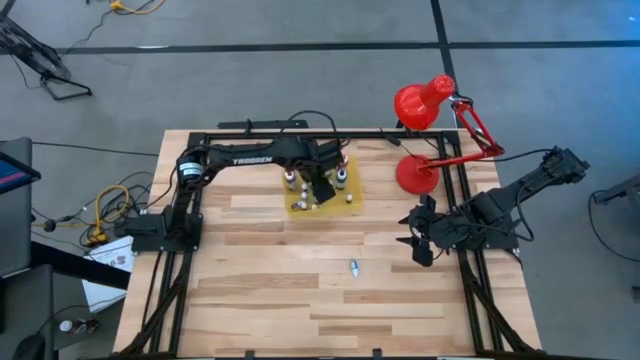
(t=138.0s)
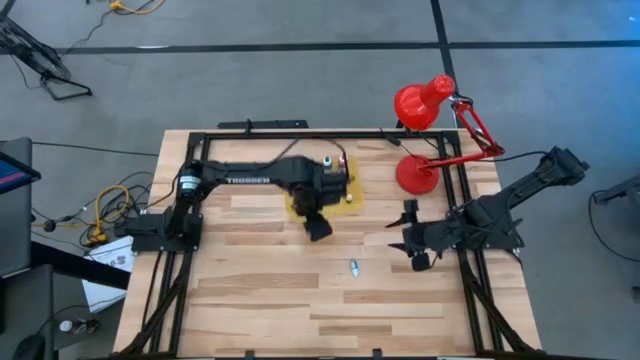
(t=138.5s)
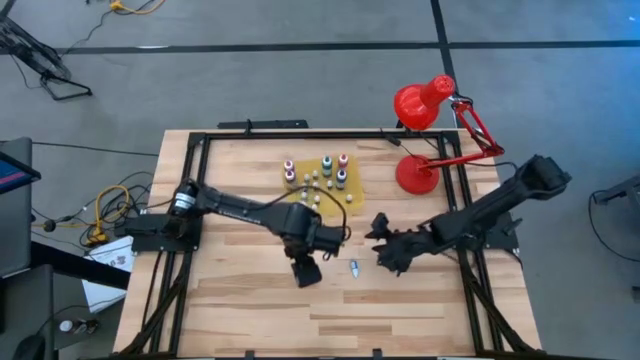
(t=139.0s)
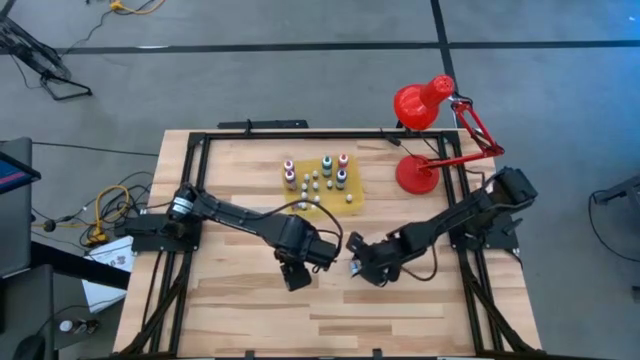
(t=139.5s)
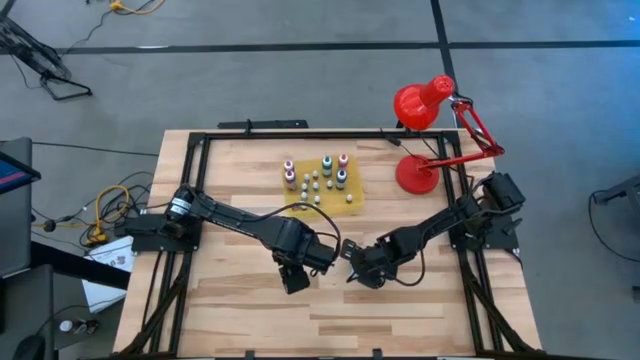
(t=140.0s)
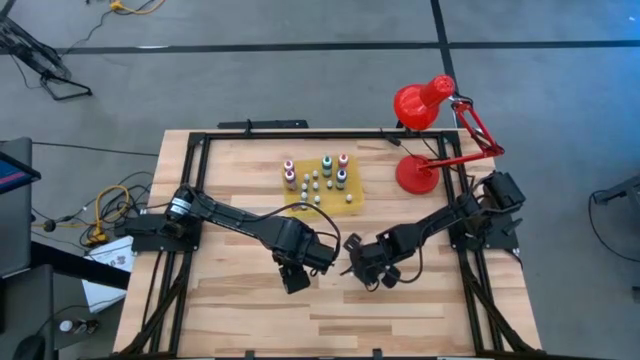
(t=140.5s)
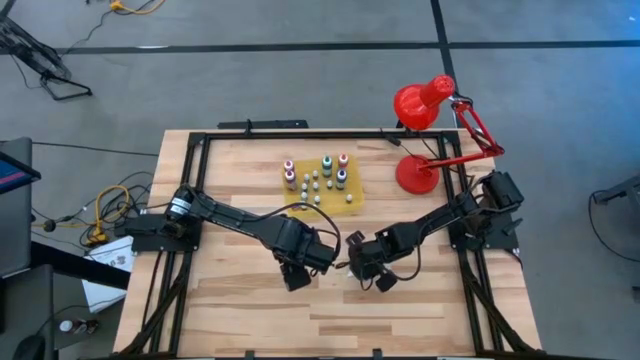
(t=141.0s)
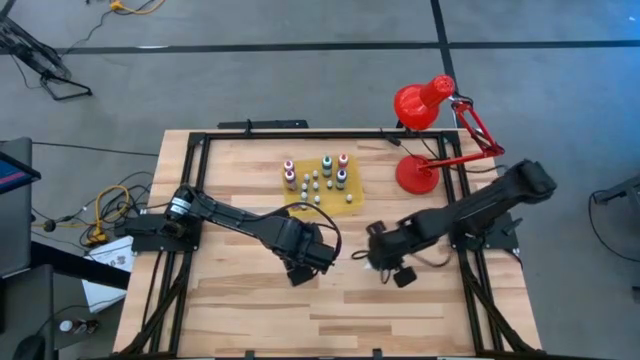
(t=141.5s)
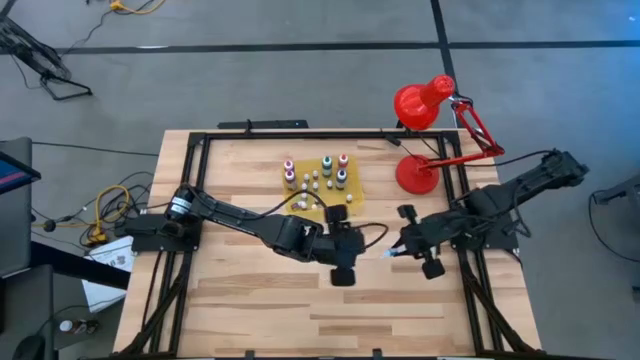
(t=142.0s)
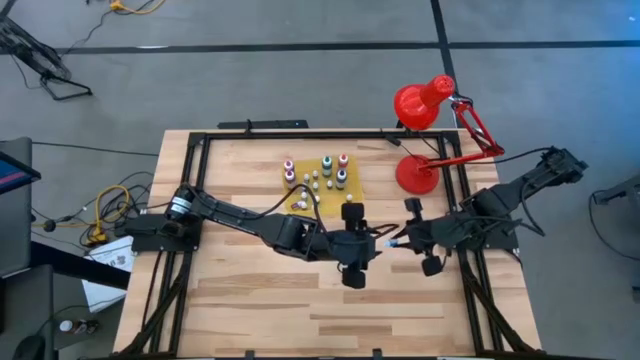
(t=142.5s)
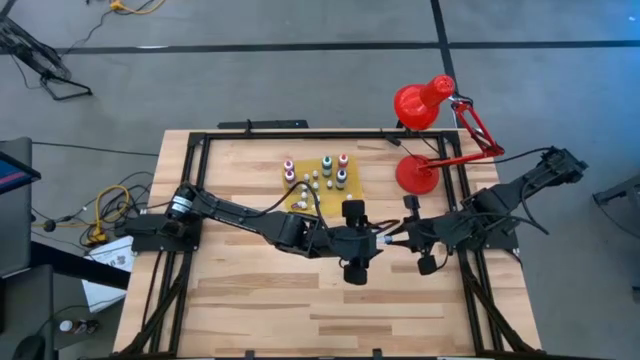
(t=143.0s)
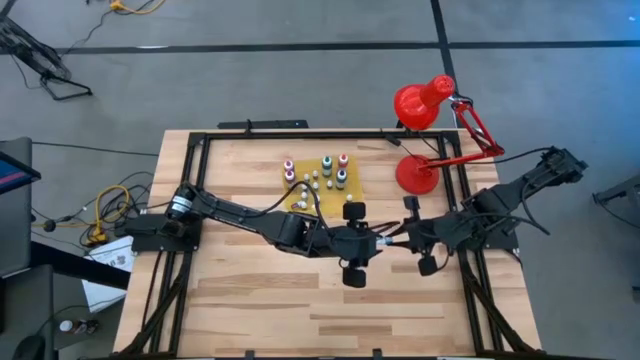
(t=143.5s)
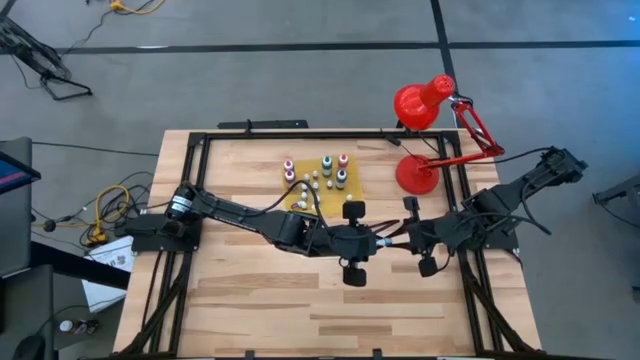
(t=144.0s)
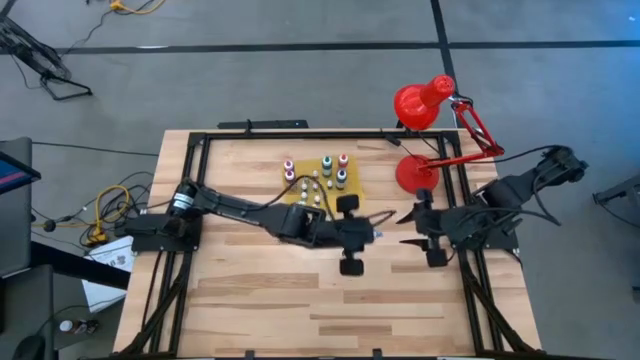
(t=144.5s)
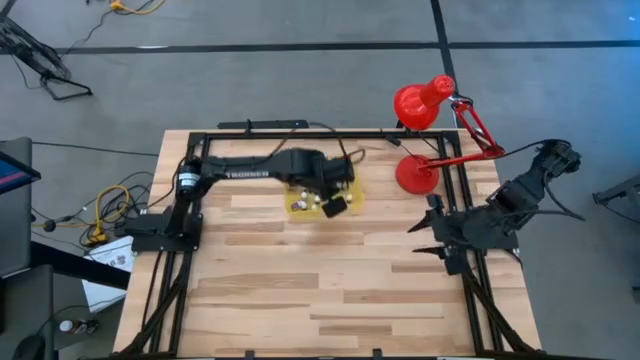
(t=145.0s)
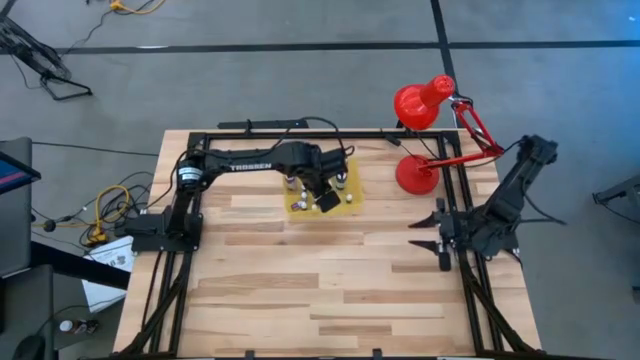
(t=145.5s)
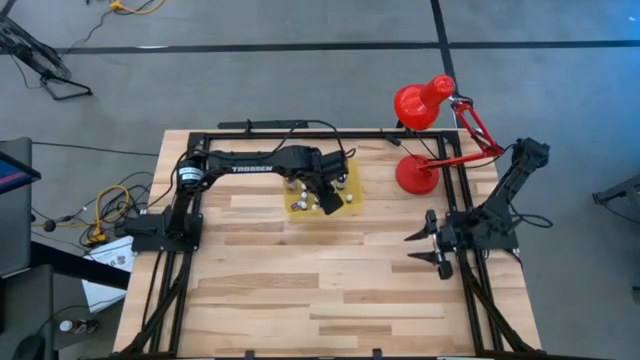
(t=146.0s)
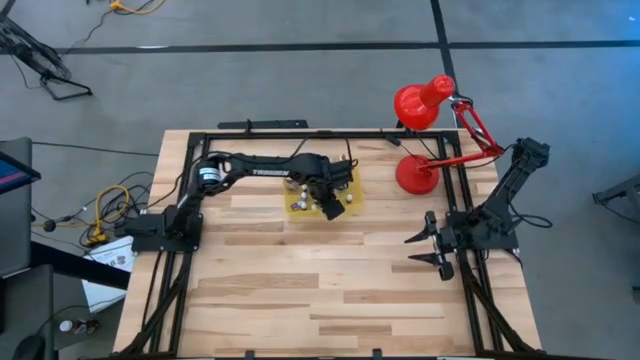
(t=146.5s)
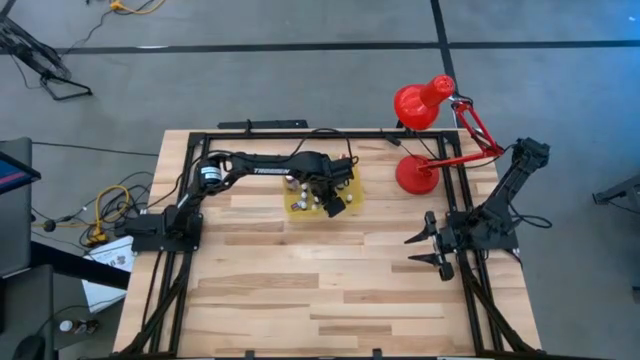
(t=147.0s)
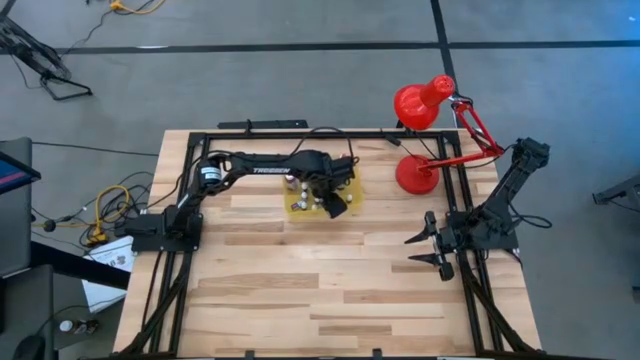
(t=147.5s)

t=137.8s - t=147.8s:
Task: Pick & Place food coloring
Put the small white food coloring in the bin

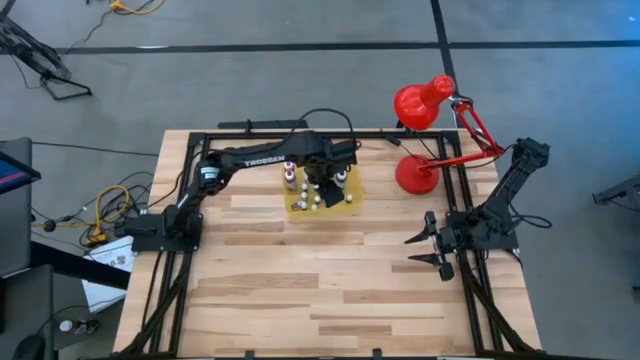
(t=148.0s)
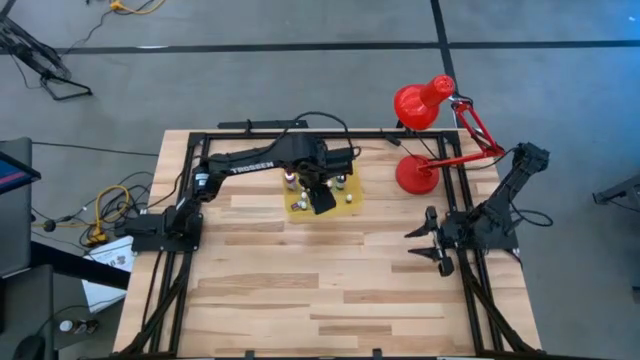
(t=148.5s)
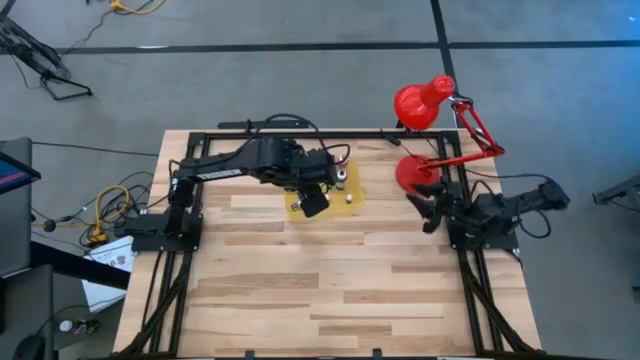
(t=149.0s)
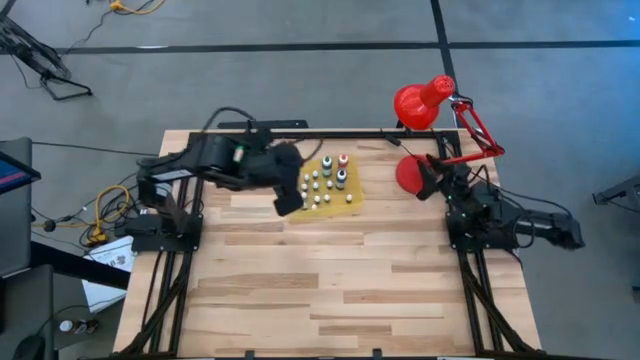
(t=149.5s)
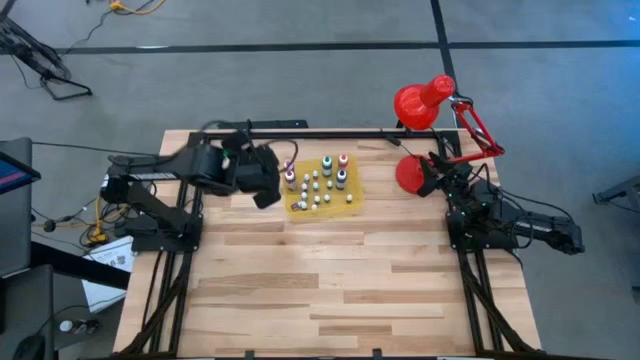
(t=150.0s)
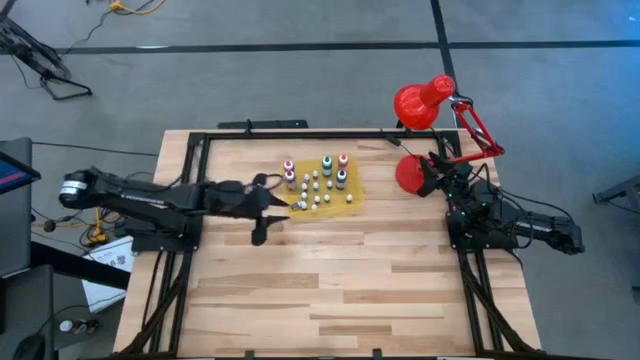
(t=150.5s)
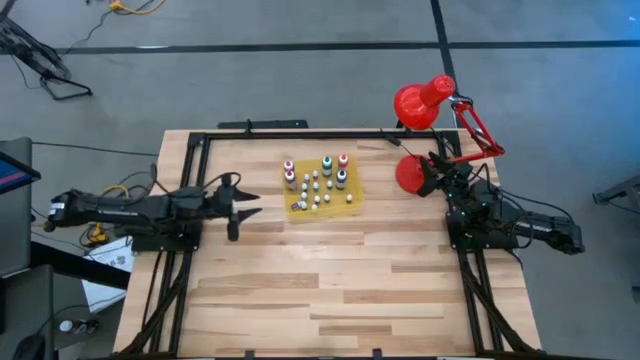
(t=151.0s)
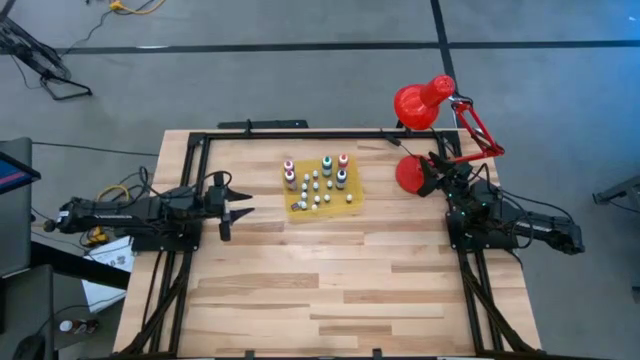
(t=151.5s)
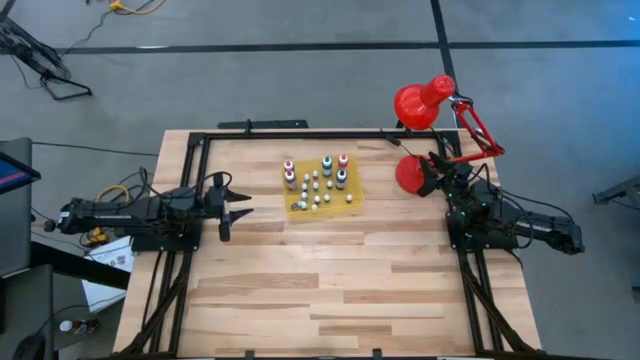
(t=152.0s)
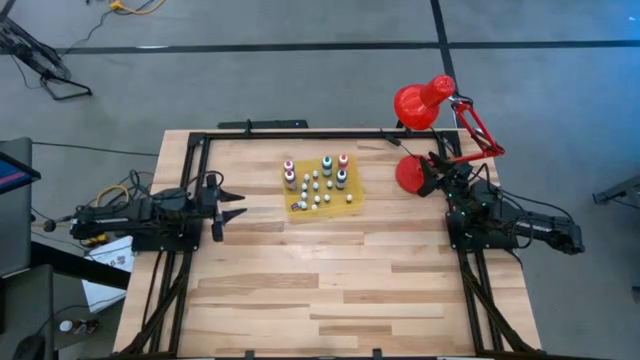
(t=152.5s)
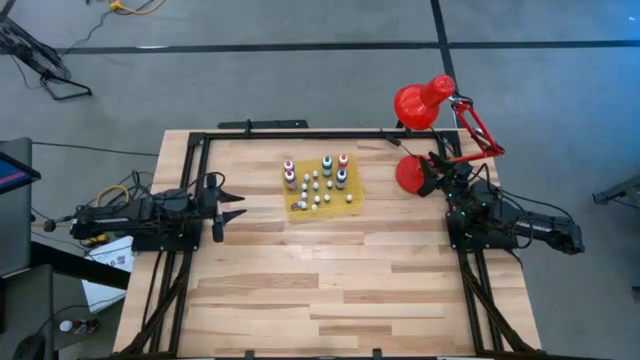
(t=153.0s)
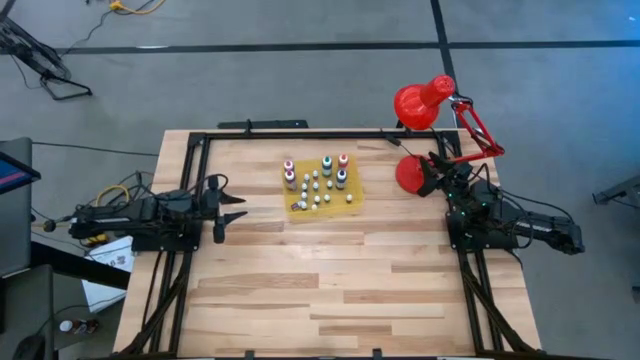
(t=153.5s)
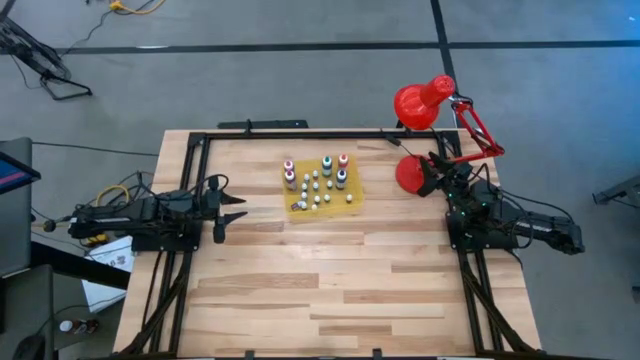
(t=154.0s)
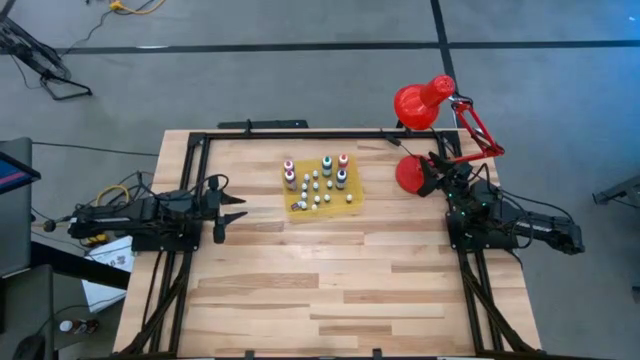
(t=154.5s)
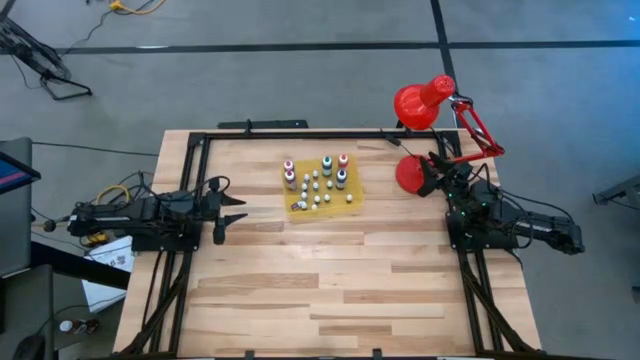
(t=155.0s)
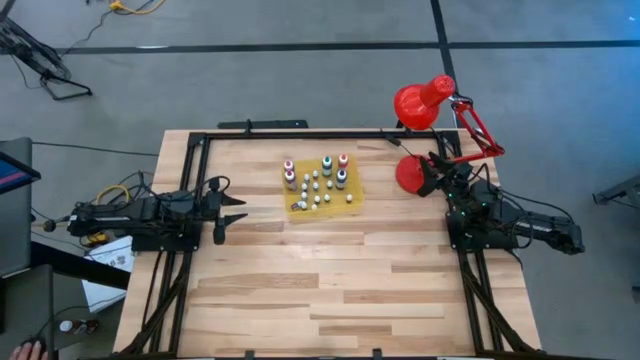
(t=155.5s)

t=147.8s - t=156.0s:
Return to Home Position

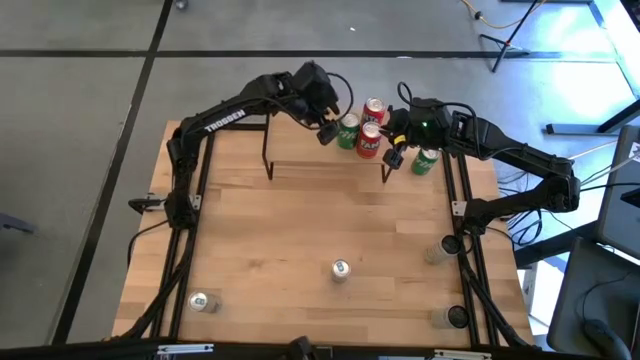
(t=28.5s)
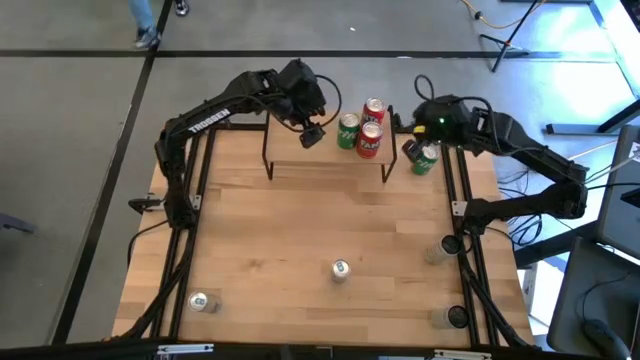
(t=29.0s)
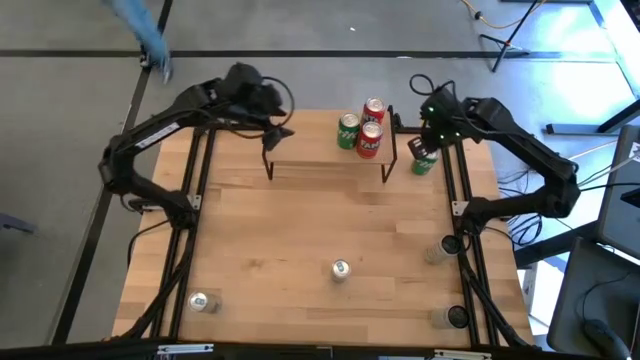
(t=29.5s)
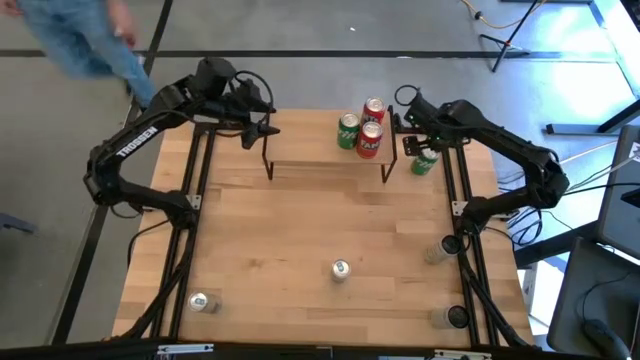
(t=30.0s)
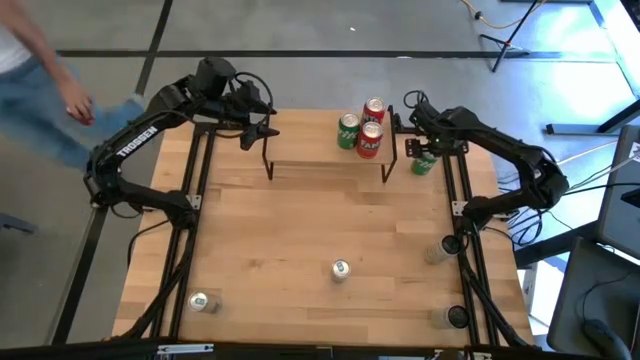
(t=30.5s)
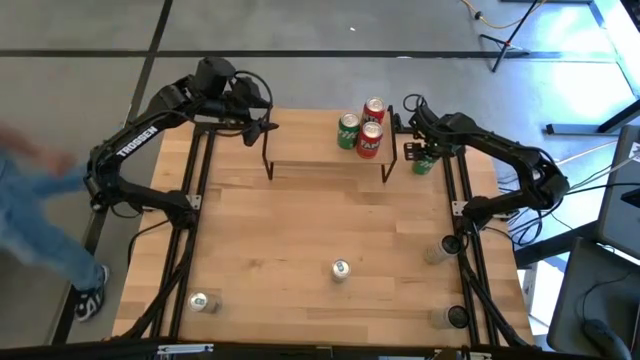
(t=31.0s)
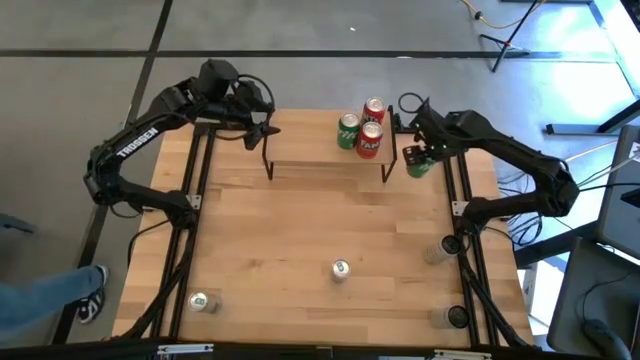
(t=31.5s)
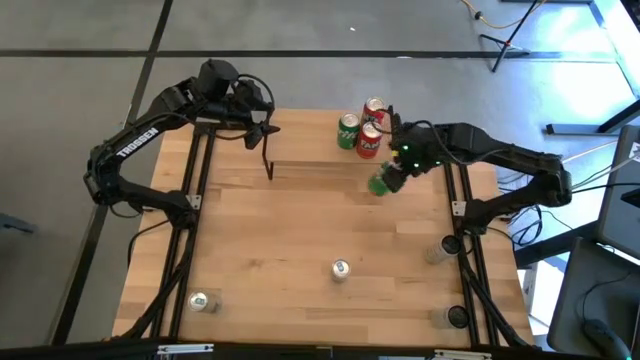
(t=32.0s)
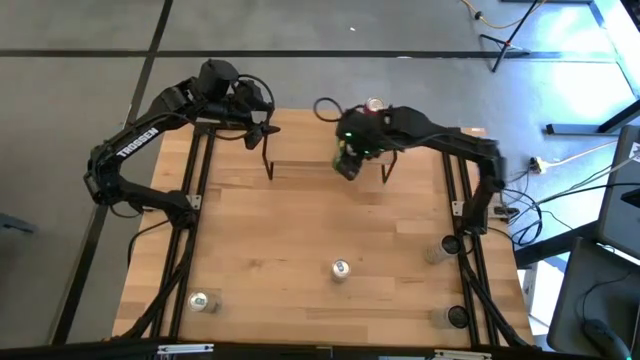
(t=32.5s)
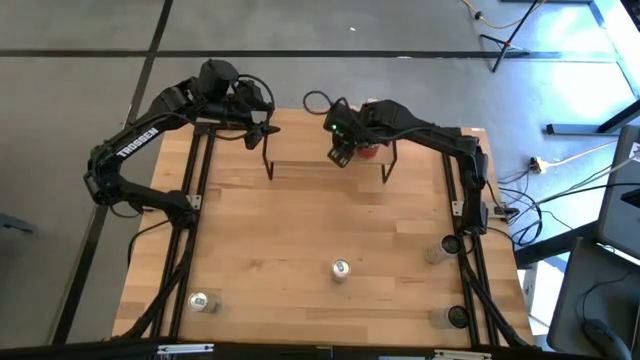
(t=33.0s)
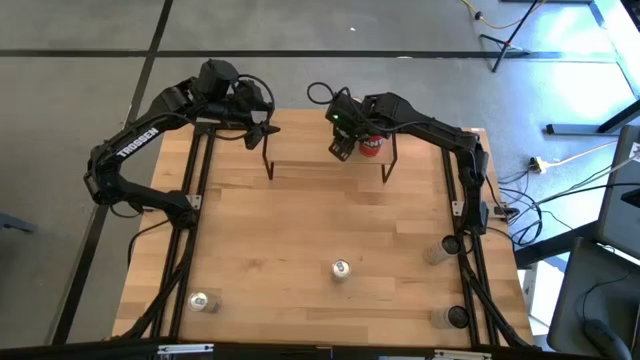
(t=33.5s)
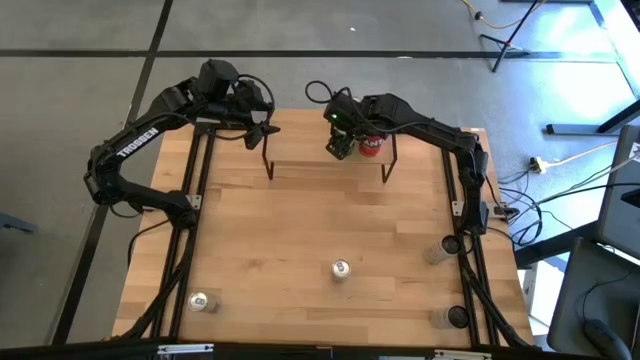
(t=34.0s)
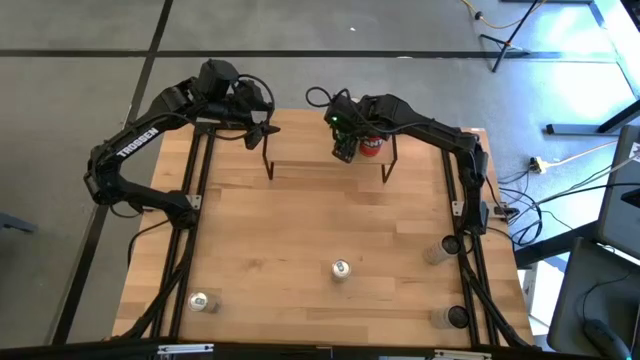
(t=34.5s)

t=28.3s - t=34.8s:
Task: Place canned beverage on shelf
Put the green soda can on the shelf aligned with the other green soda can
